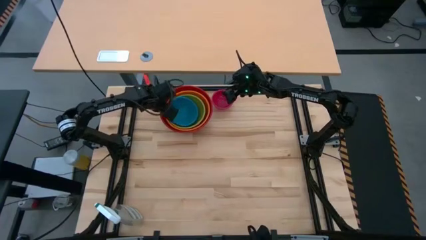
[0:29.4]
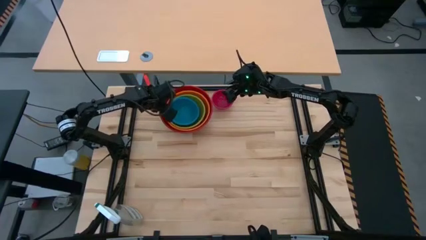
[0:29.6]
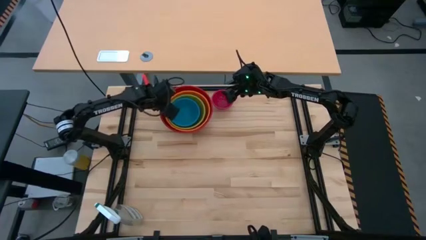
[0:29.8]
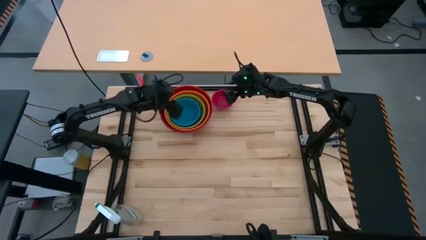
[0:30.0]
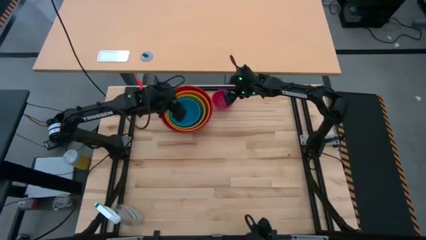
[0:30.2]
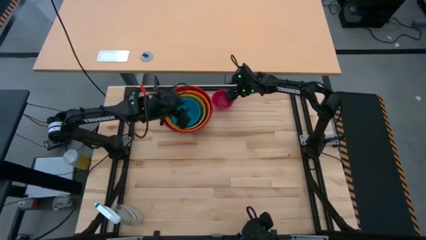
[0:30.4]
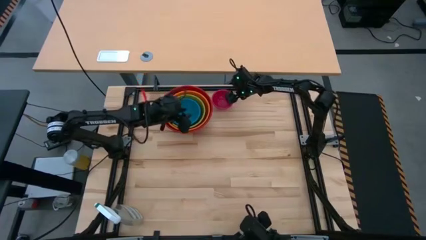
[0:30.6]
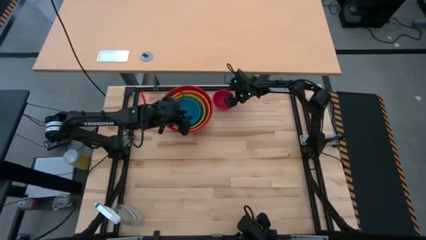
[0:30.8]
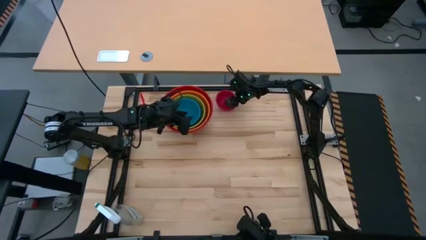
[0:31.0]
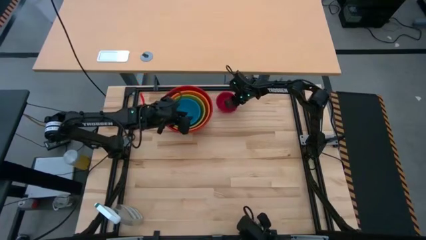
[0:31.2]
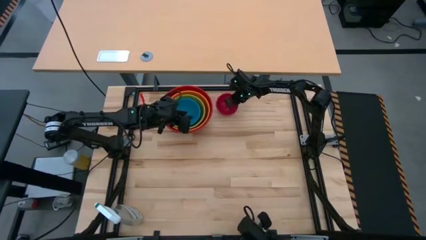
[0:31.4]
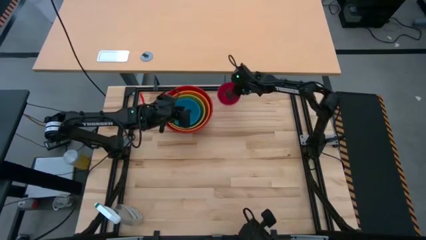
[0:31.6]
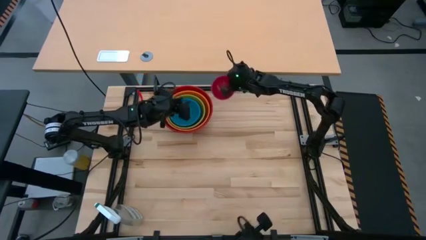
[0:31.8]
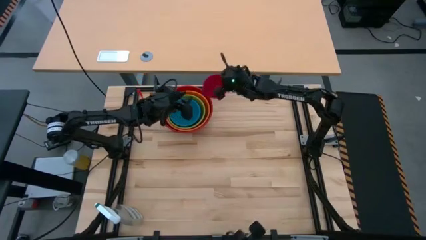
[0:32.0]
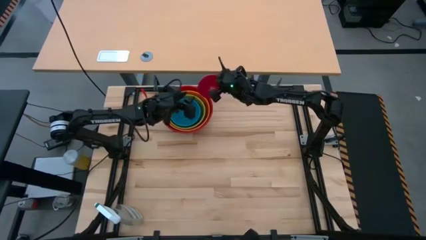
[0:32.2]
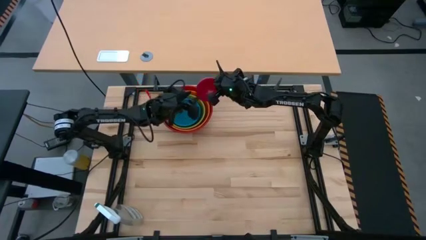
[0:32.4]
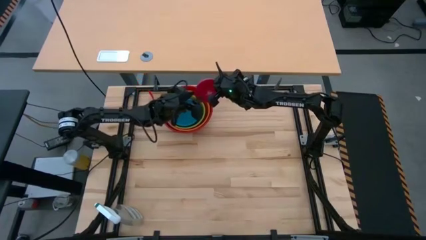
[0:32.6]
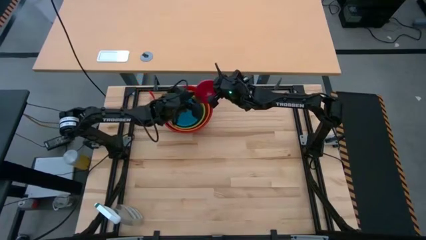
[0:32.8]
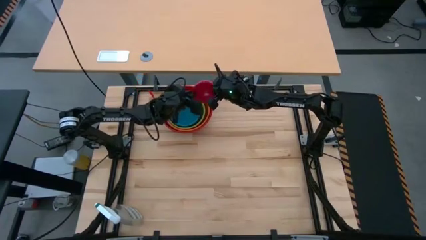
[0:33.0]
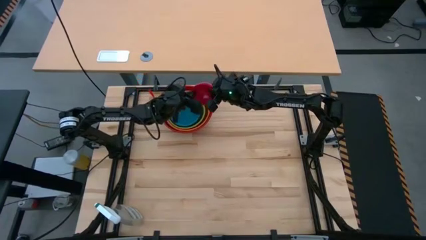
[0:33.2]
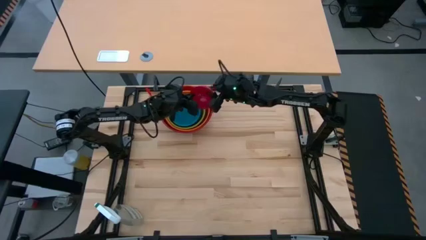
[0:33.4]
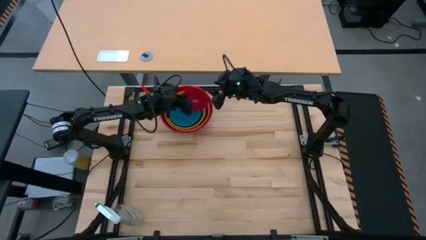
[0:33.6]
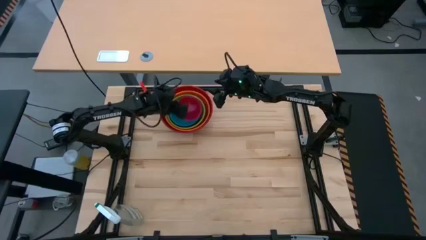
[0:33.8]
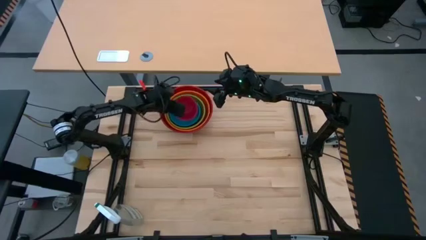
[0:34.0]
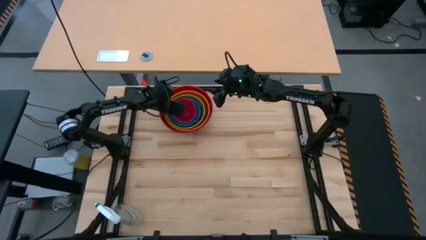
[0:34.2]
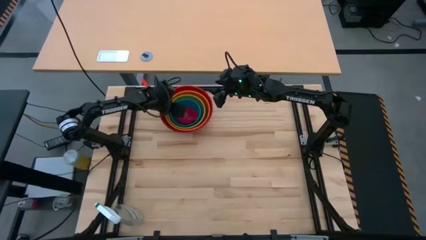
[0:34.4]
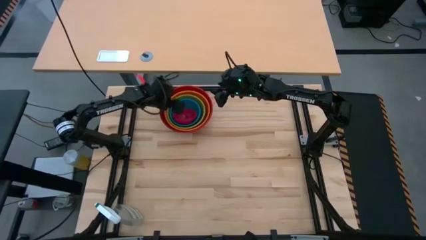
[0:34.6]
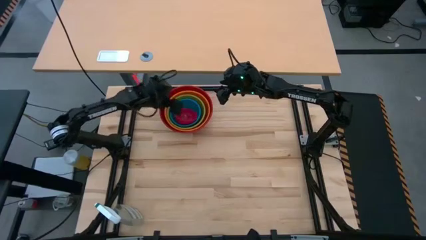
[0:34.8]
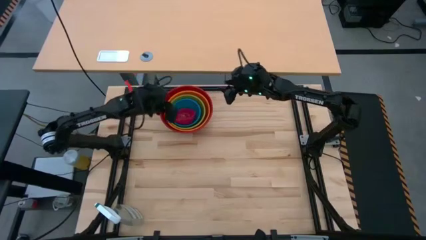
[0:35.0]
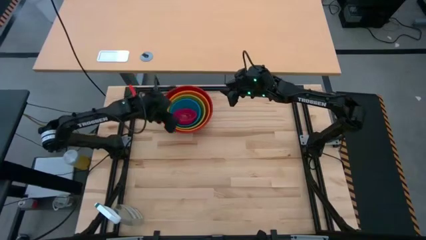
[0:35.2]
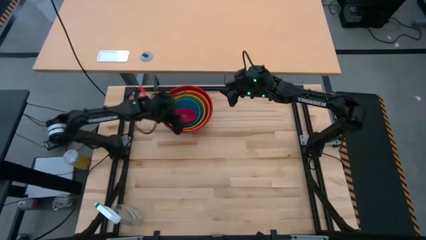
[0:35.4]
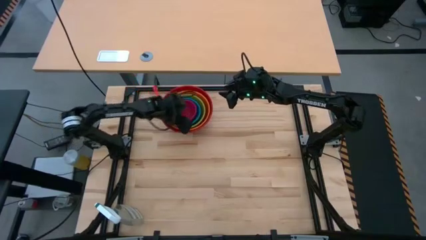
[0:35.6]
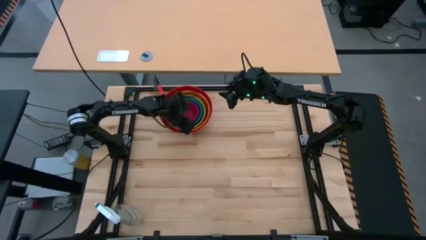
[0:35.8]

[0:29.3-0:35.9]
Stack the pink bowl on top of the blue bowl

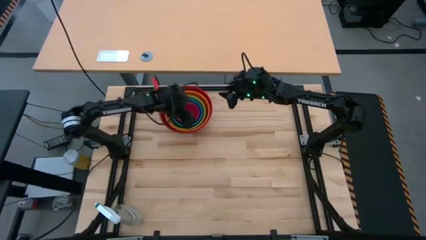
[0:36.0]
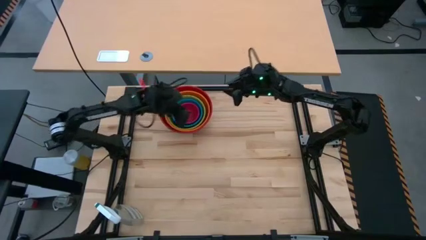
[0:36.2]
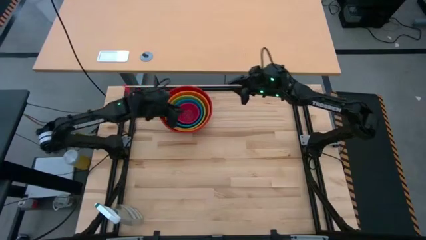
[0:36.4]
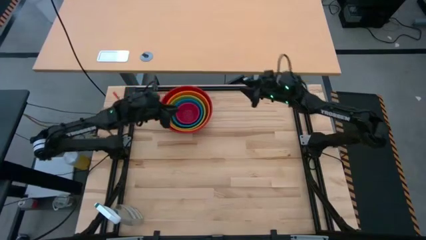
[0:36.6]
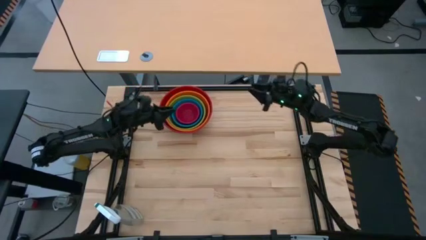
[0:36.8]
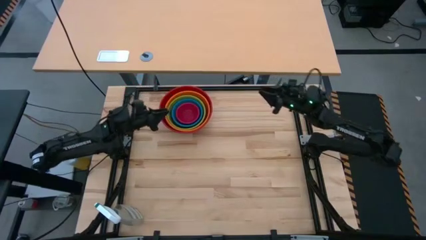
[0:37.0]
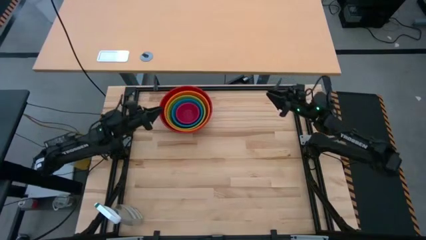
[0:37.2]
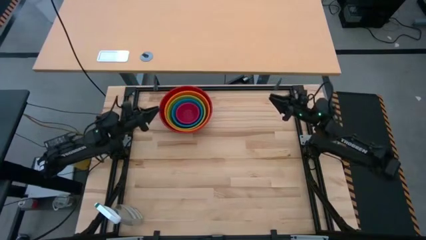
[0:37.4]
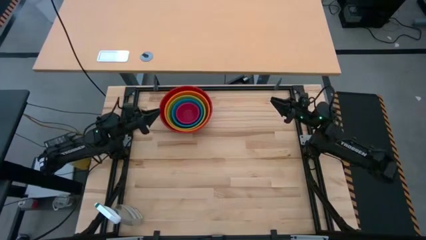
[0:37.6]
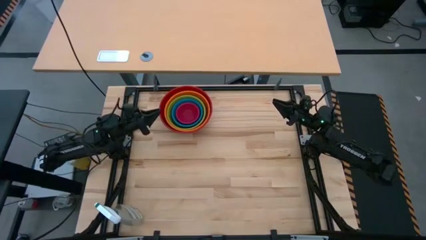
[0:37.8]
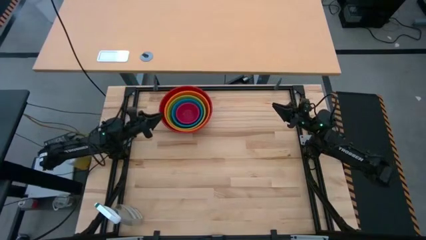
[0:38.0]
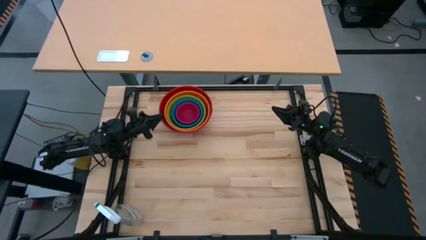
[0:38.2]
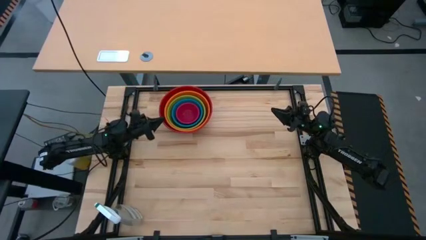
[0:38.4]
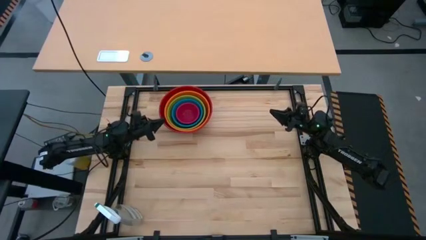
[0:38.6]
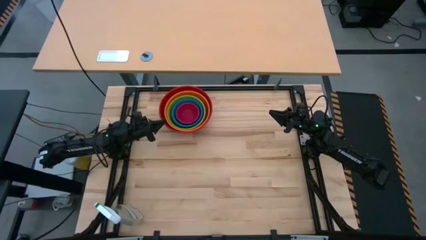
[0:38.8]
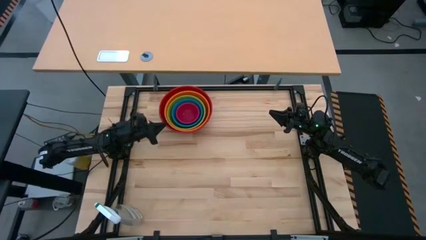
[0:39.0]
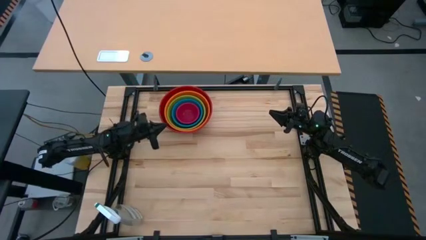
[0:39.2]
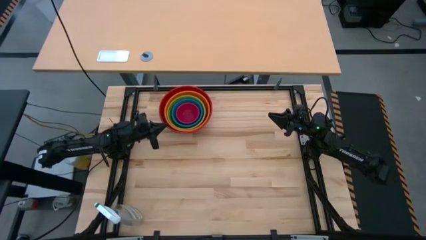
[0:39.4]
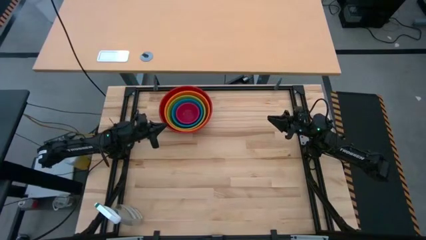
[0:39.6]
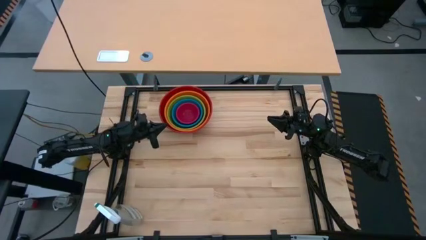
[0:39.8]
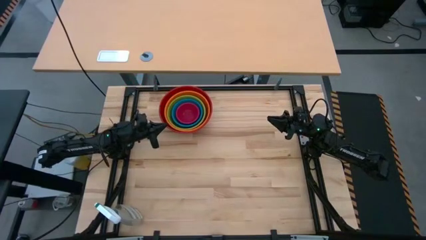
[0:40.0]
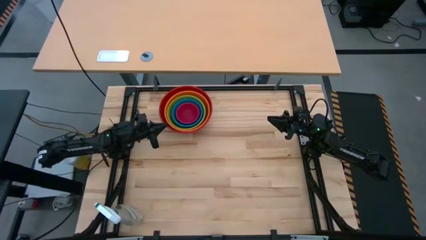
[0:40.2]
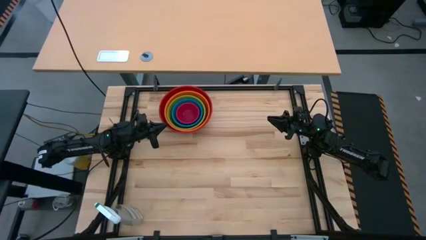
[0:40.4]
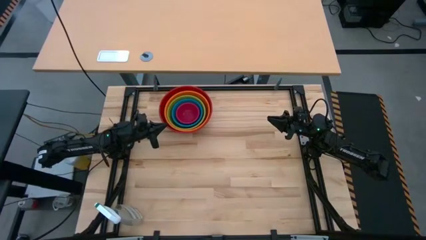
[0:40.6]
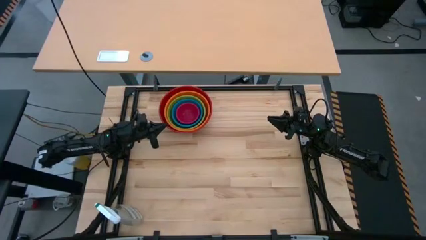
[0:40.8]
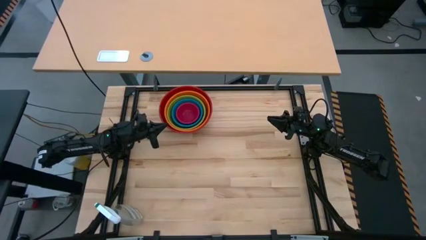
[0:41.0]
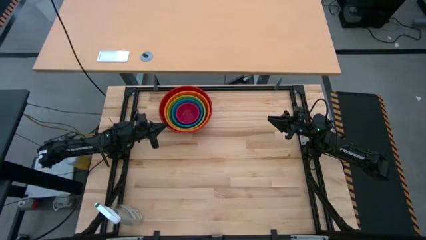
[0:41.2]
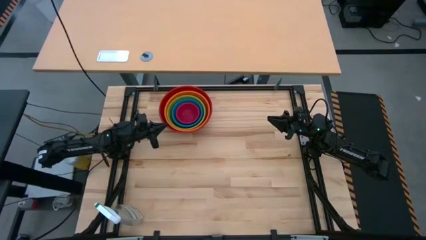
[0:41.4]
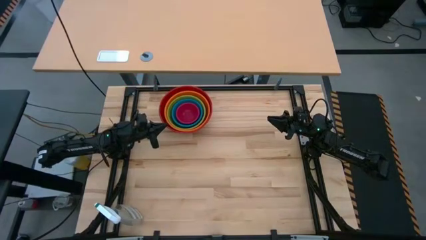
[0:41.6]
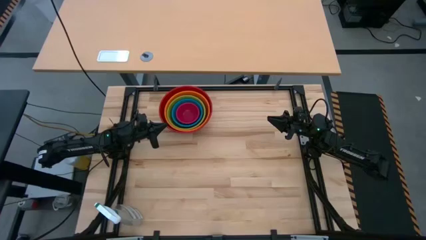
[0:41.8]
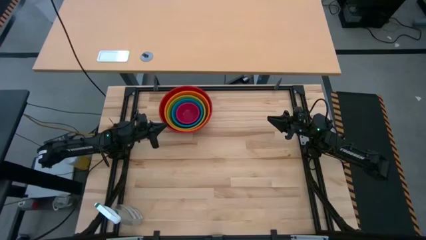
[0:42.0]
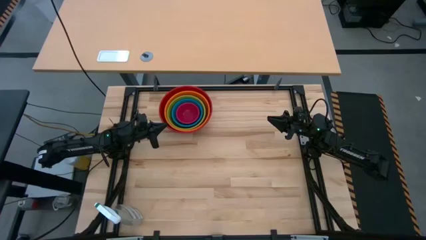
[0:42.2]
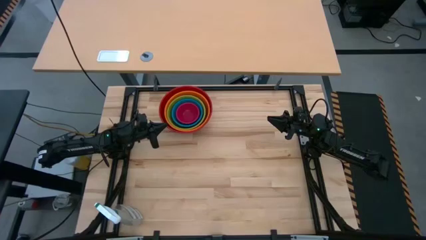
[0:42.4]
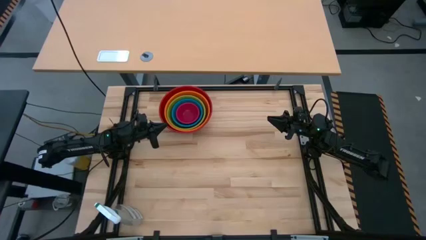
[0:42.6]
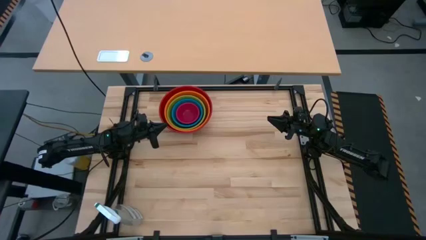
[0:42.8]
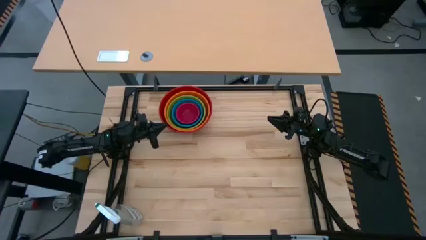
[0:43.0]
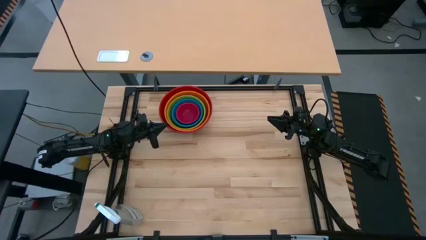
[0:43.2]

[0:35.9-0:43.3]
Return to Home Position
